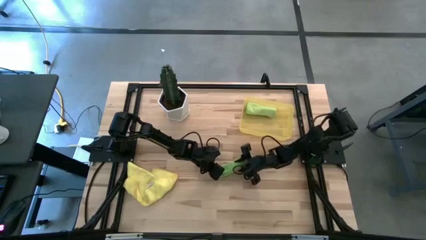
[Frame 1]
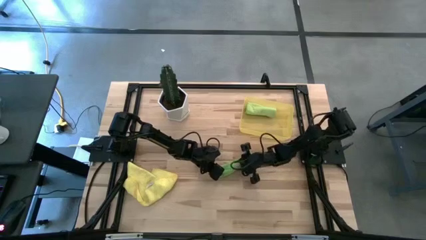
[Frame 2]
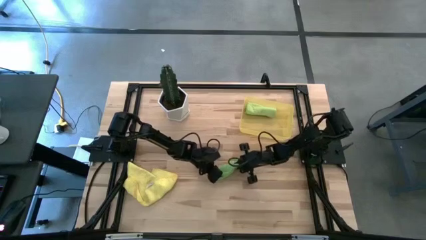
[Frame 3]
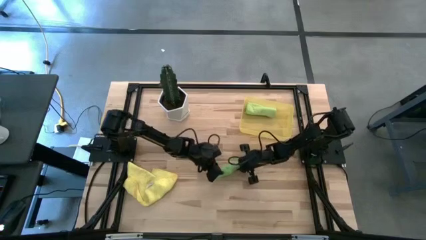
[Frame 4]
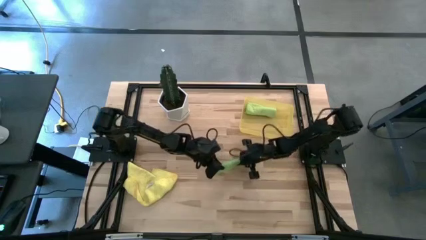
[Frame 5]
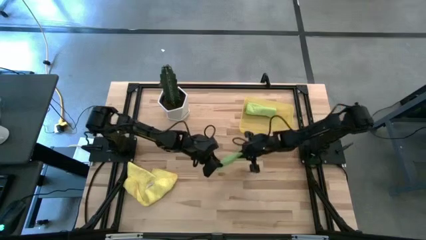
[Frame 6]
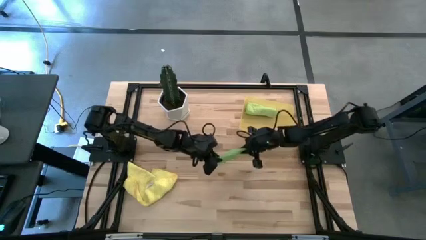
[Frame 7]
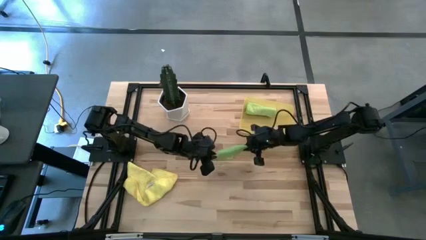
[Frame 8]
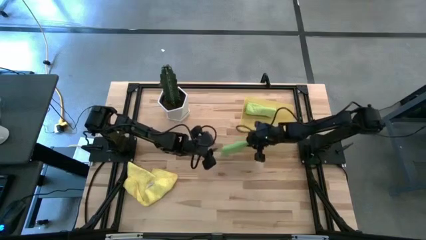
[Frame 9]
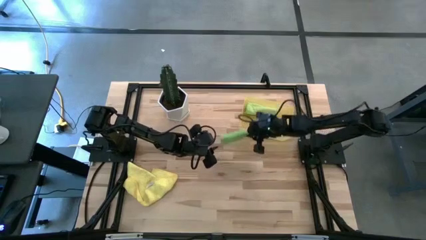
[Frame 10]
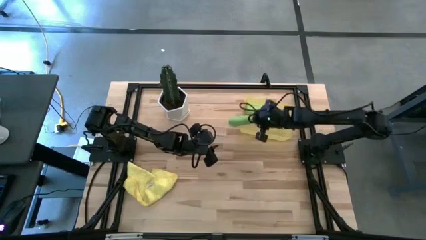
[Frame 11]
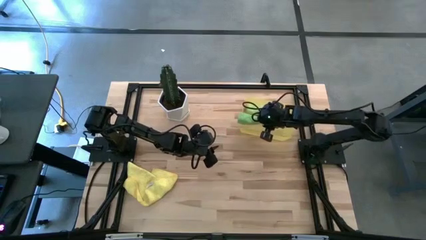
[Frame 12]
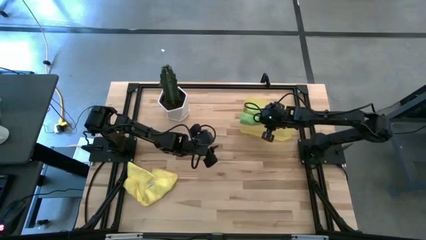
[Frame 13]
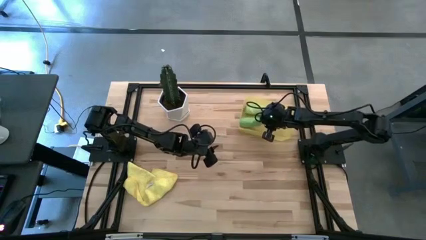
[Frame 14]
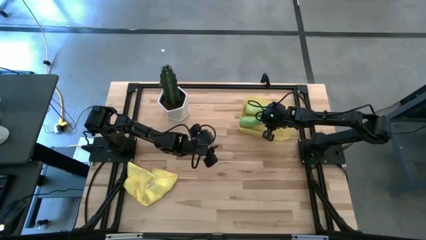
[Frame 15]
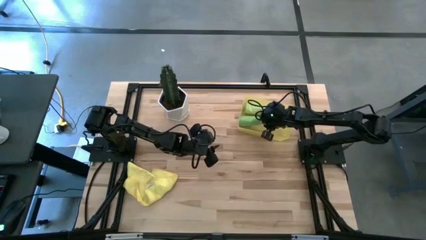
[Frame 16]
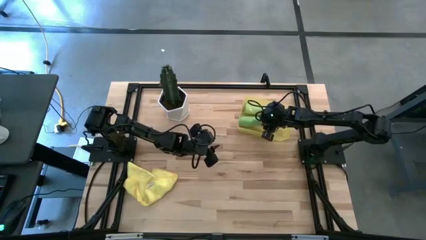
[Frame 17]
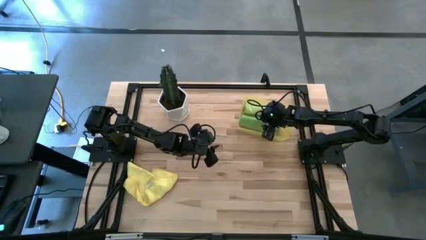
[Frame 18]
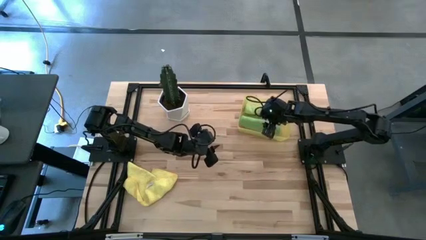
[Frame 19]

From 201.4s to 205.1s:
Task: Roll microfiber towels into tight, uniform cylinder then place into a basket
Put the green microfiber cloth into the yellow bin

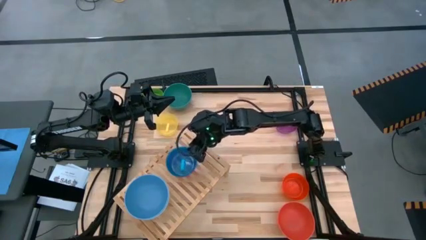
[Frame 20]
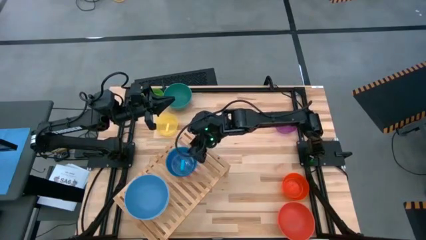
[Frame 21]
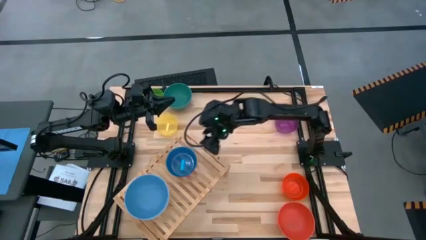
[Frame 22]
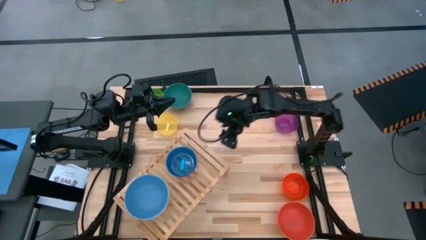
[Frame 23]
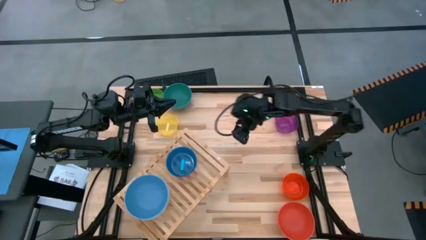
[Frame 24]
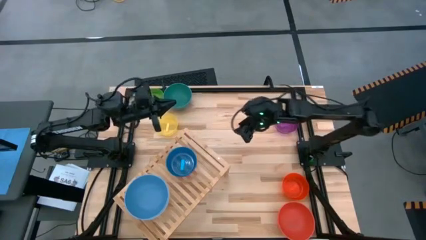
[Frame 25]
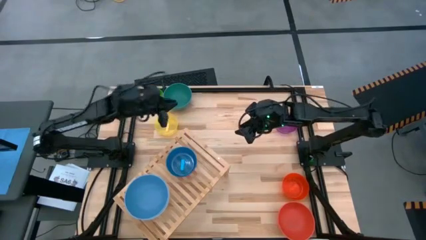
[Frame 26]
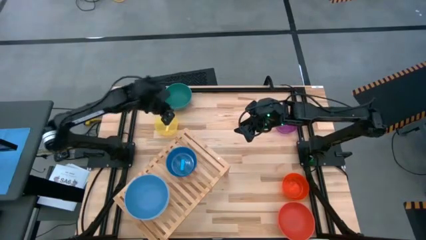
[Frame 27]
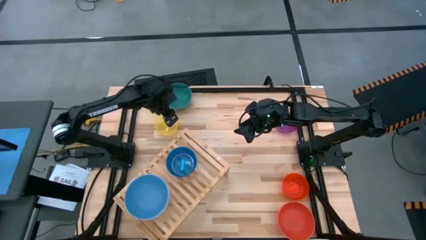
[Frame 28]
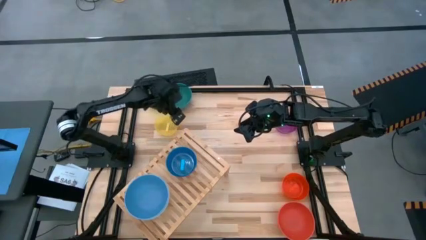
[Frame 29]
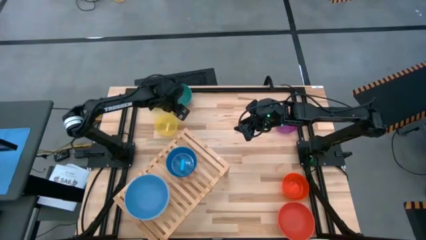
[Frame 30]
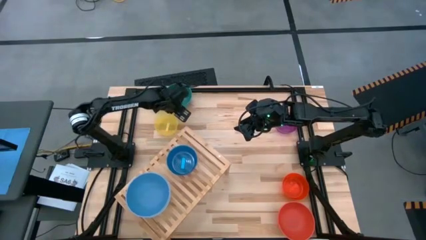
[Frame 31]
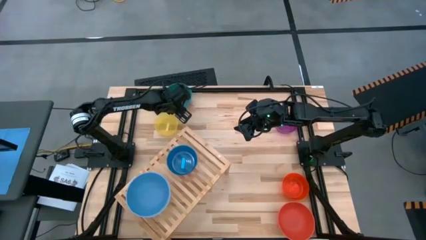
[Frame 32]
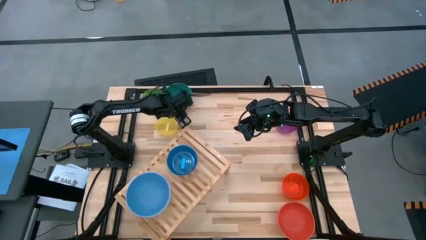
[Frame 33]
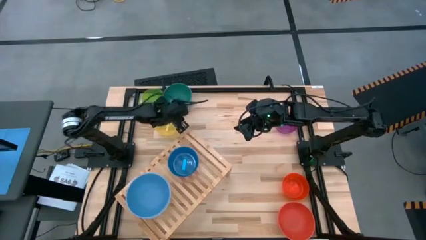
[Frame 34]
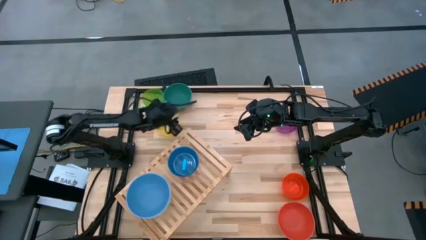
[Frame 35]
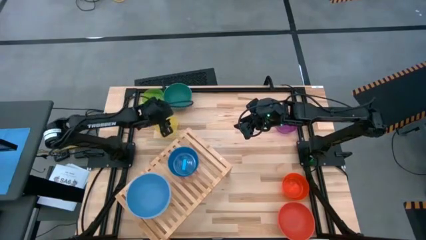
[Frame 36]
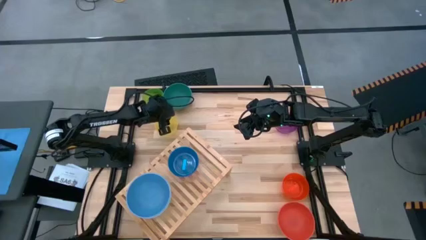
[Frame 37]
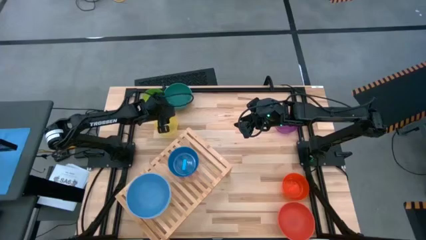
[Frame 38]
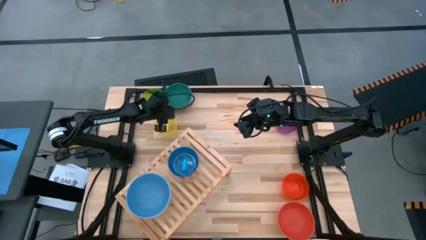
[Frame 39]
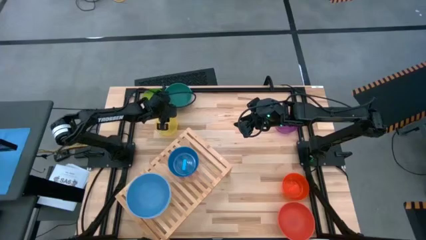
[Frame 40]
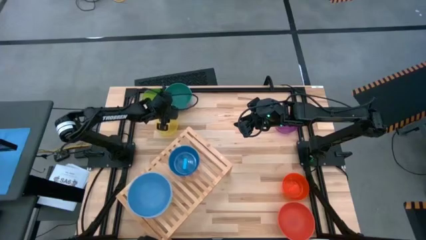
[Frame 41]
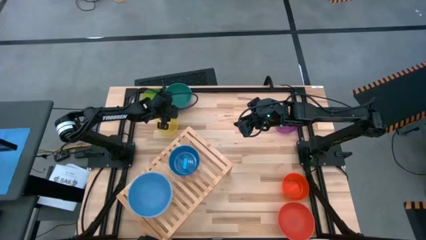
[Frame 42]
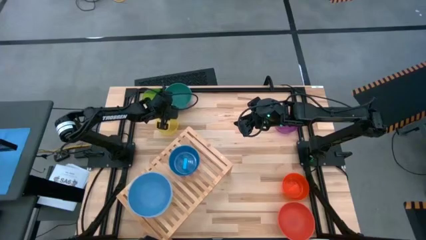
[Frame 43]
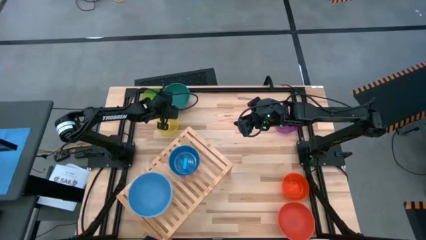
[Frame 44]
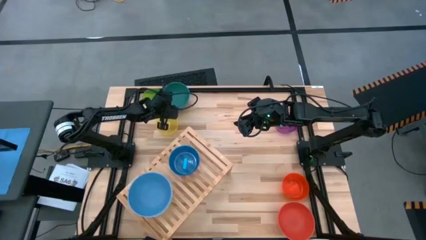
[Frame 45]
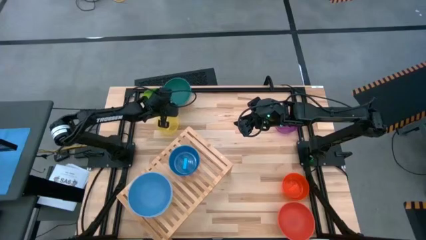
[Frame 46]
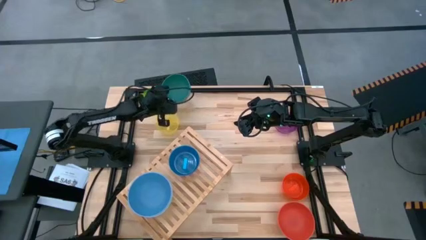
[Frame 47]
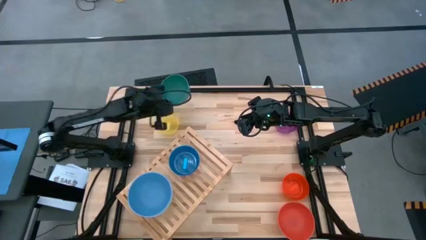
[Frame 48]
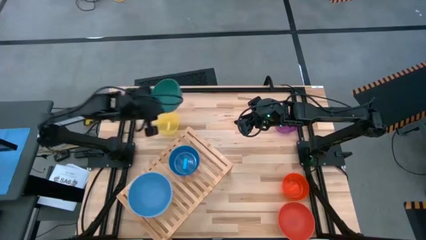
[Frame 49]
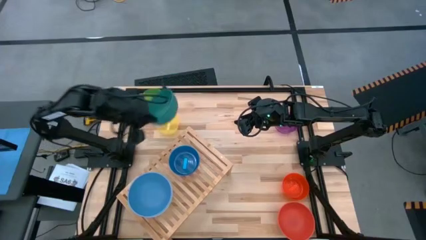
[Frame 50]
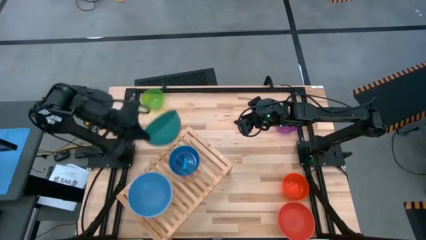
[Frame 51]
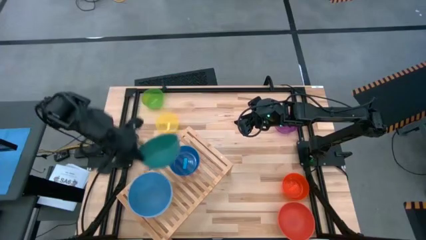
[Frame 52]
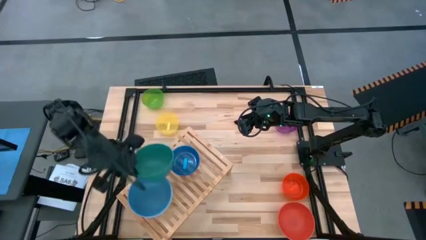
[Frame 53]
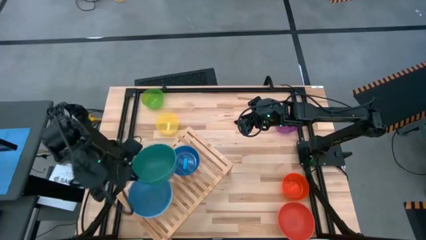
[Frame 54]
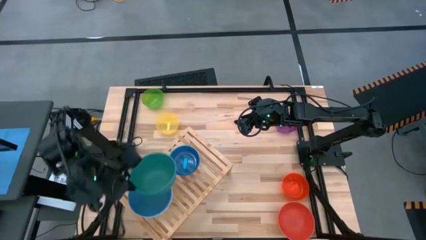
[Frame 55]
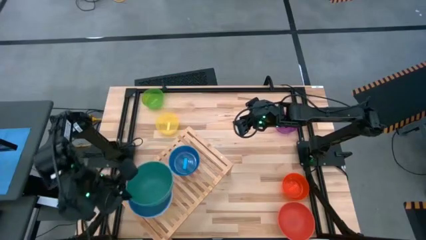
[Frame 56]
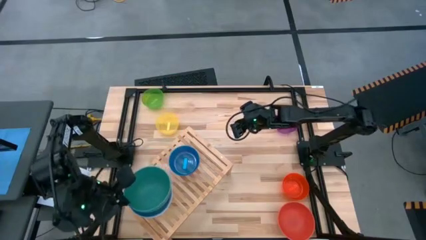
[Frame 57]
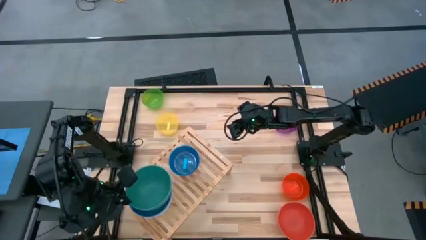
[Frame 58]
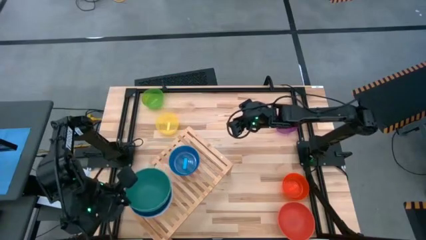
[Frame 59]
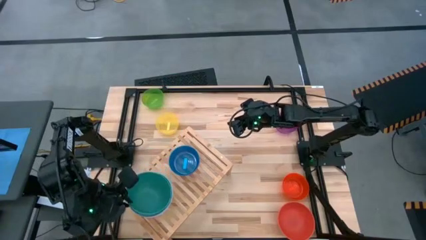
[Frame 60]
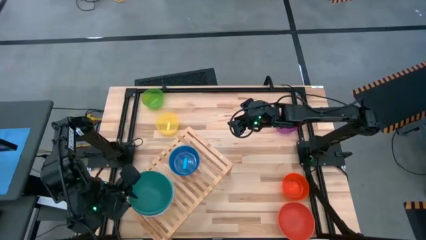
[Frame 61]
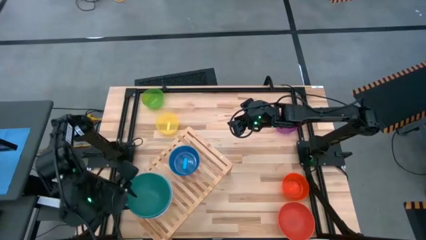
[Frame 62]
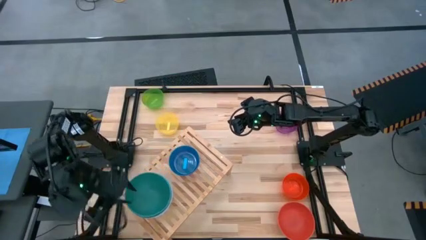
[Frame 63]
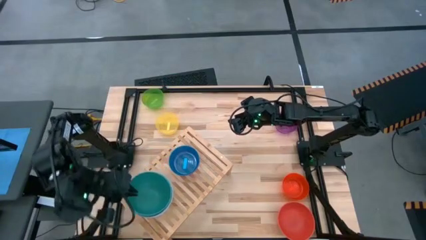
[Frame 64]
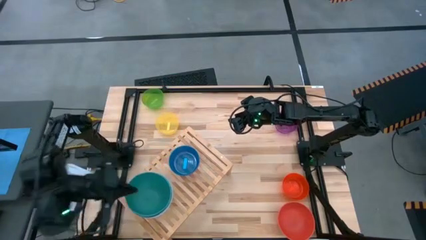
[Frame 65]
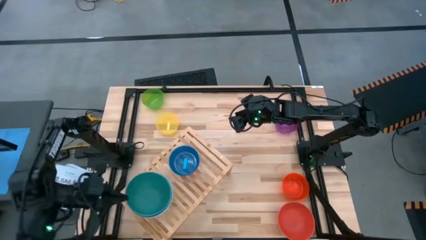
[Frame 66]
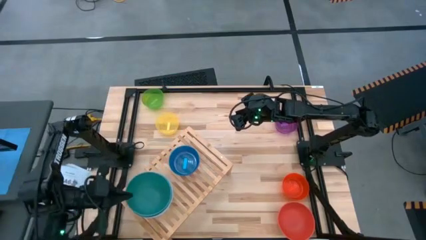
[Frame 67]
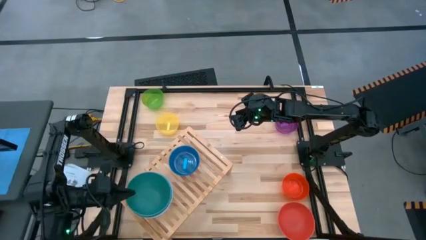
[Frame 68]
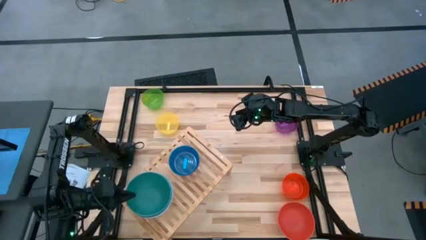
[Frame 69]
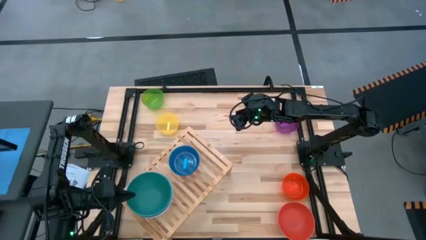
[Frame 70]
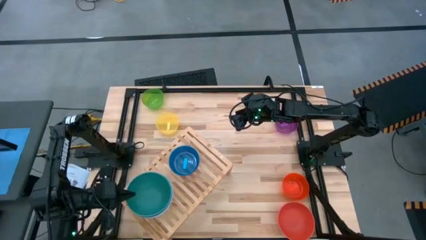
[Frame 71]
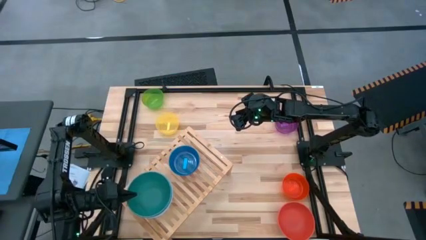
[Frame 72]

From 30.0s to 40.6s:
Task: Place and stack bowls onto a shelf
Stack the large green bowl on the shelf on top of the large blue bowl on the shelf
